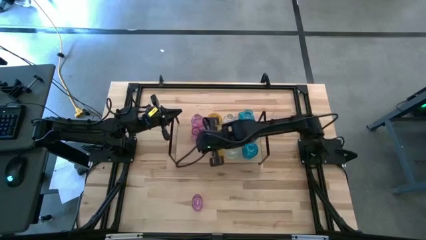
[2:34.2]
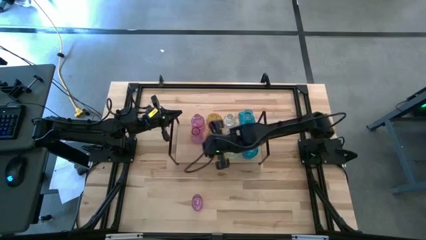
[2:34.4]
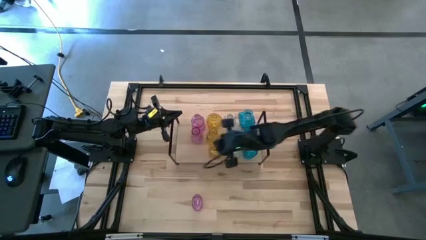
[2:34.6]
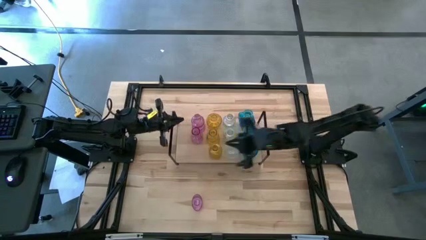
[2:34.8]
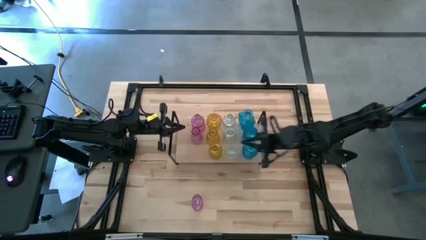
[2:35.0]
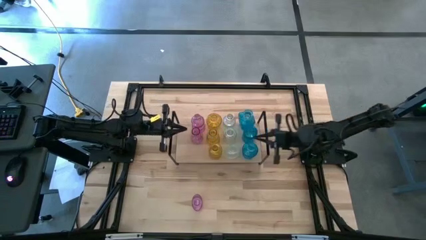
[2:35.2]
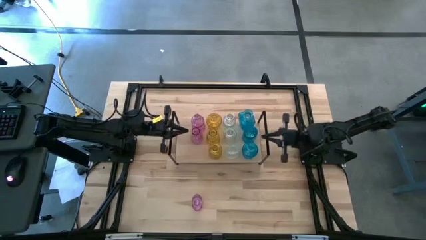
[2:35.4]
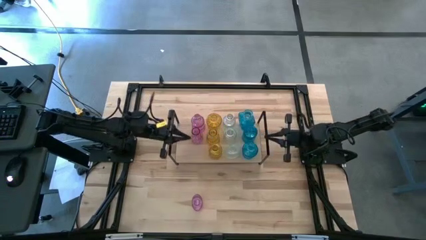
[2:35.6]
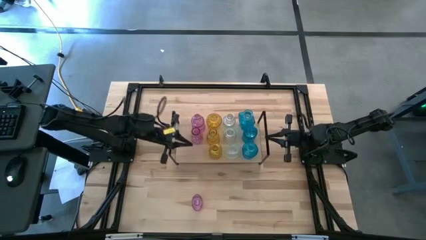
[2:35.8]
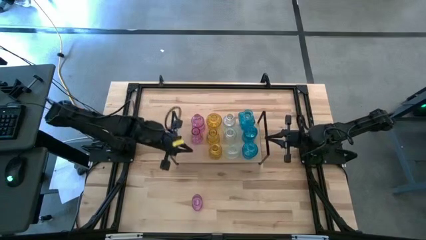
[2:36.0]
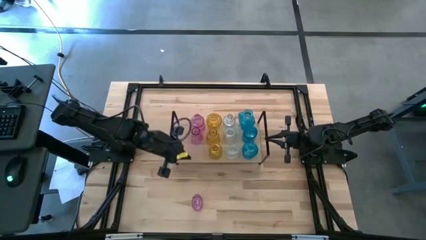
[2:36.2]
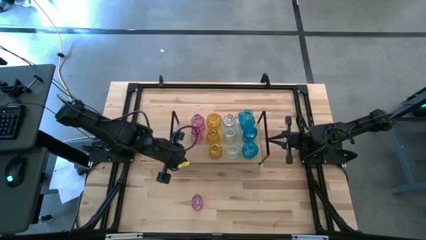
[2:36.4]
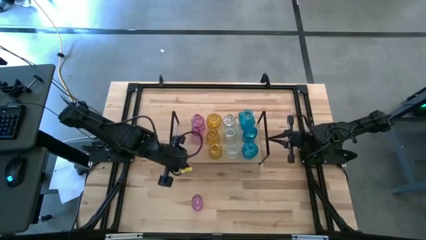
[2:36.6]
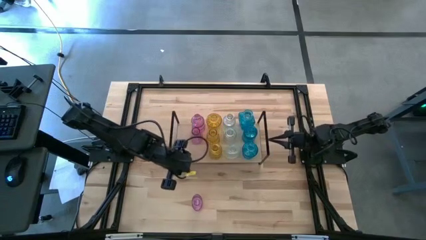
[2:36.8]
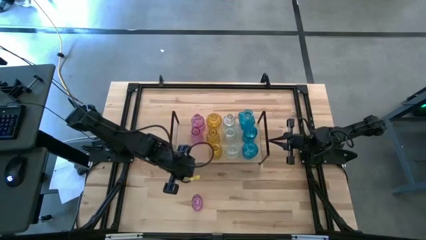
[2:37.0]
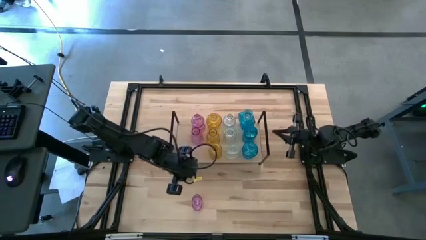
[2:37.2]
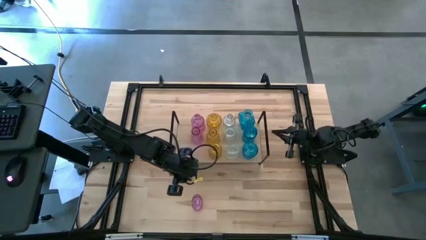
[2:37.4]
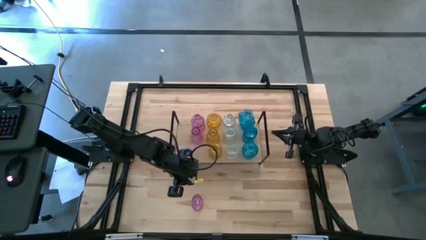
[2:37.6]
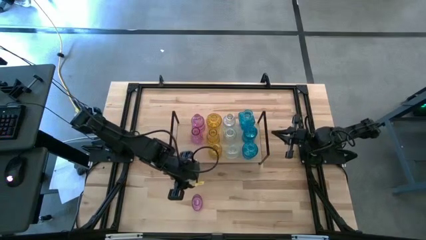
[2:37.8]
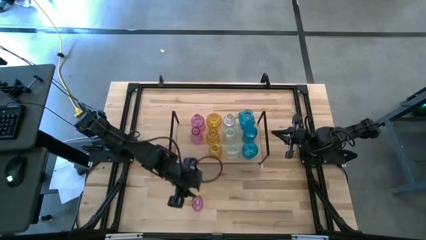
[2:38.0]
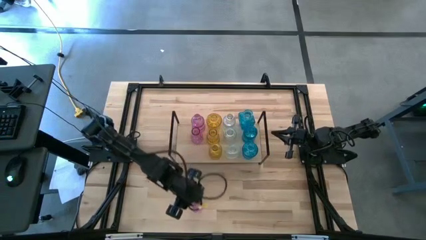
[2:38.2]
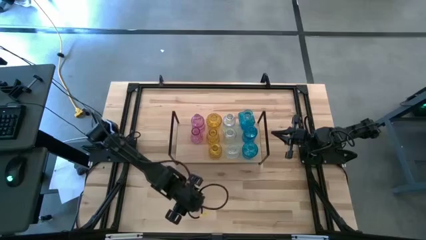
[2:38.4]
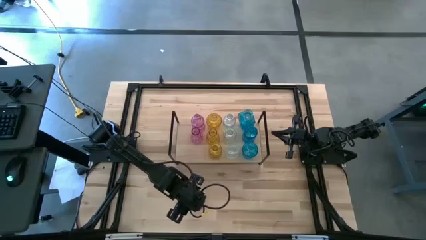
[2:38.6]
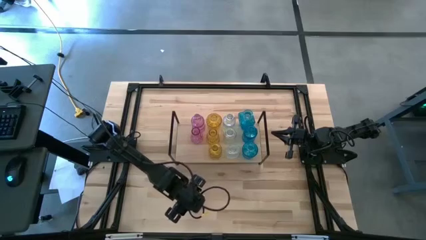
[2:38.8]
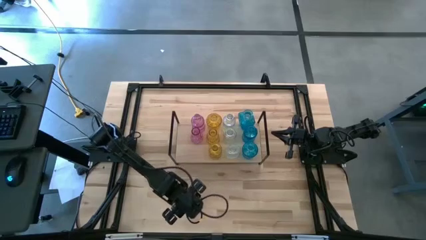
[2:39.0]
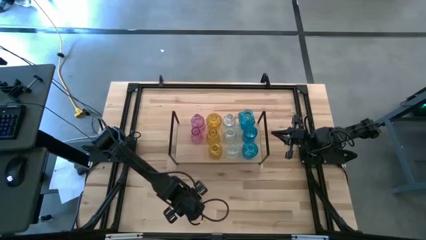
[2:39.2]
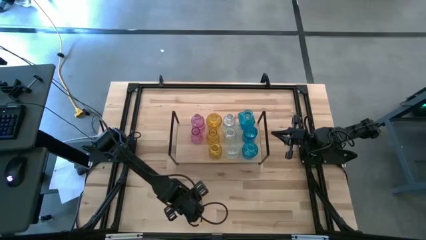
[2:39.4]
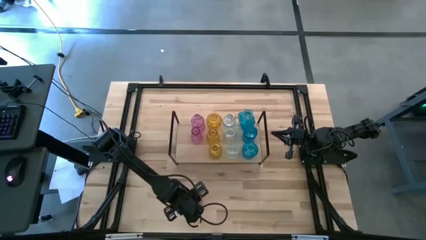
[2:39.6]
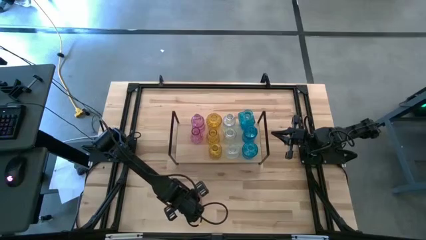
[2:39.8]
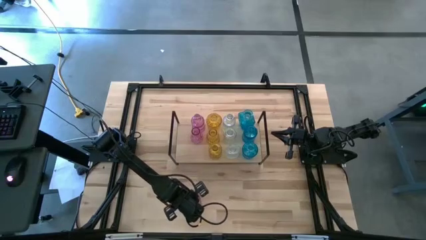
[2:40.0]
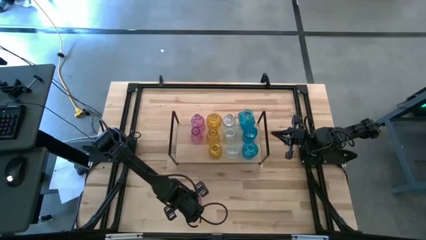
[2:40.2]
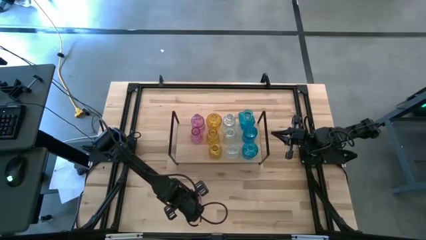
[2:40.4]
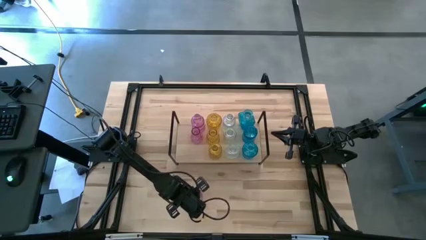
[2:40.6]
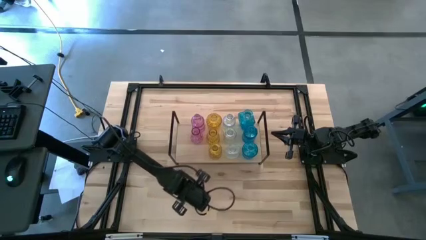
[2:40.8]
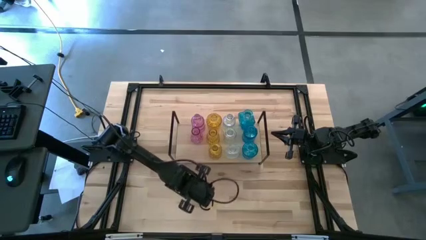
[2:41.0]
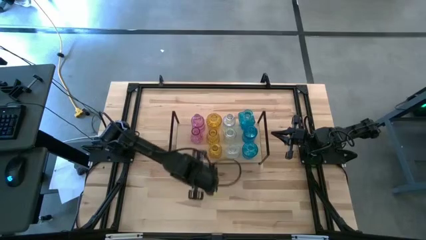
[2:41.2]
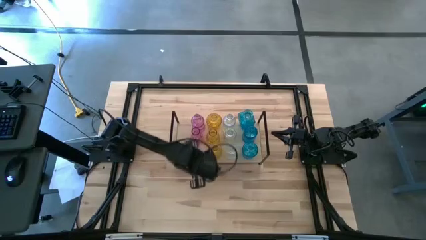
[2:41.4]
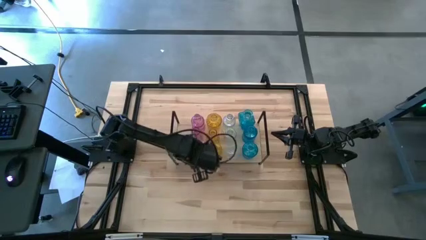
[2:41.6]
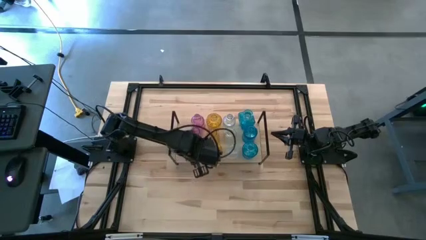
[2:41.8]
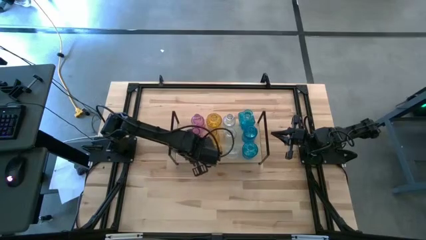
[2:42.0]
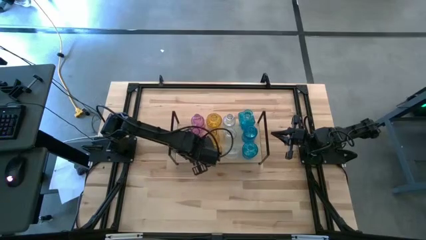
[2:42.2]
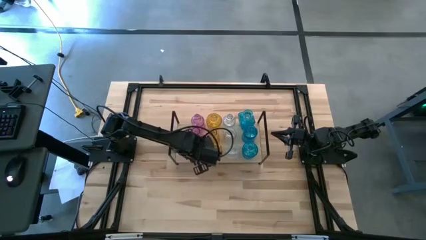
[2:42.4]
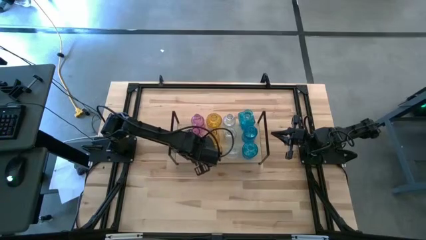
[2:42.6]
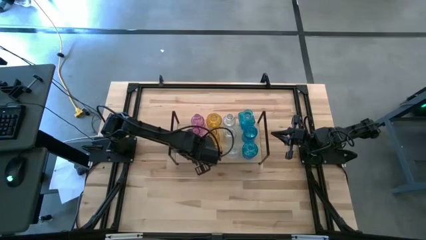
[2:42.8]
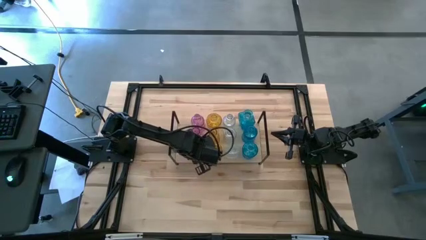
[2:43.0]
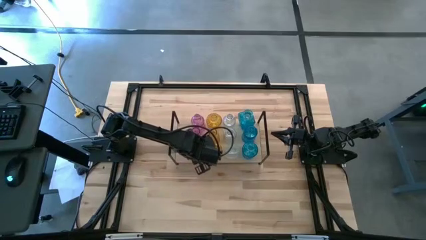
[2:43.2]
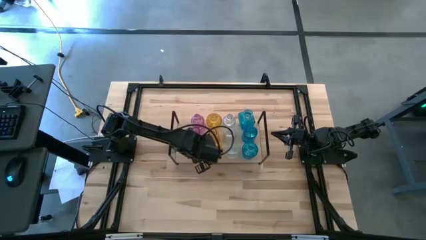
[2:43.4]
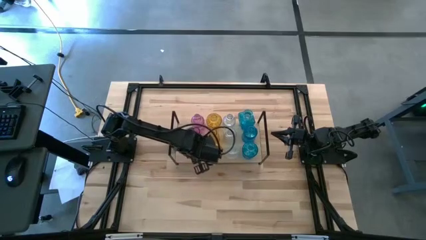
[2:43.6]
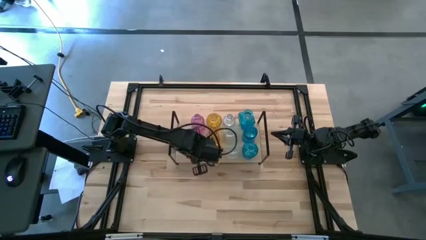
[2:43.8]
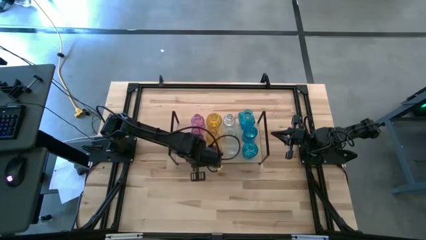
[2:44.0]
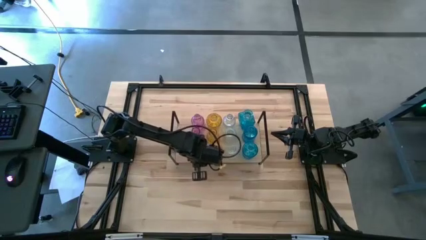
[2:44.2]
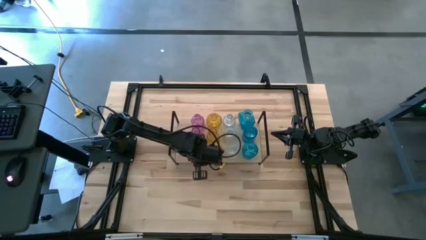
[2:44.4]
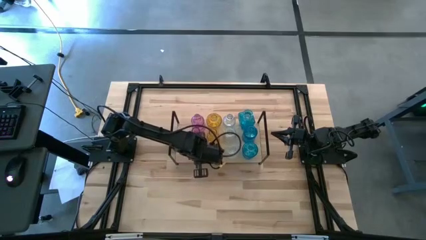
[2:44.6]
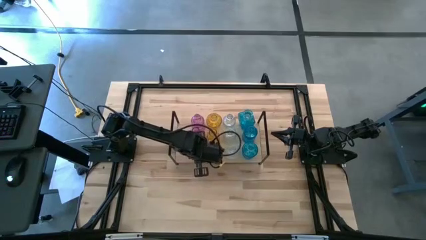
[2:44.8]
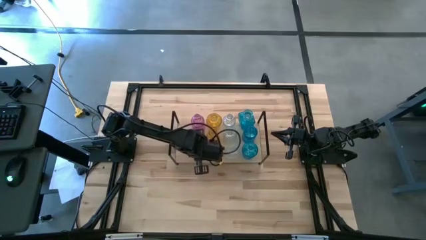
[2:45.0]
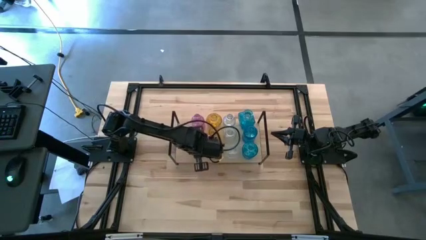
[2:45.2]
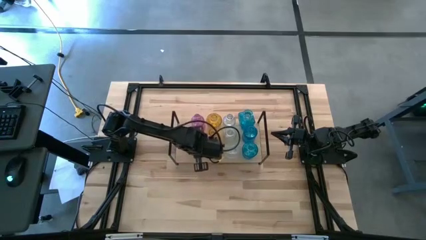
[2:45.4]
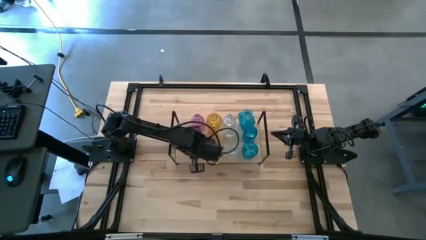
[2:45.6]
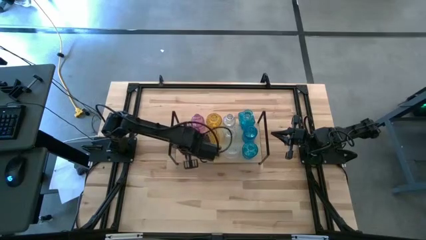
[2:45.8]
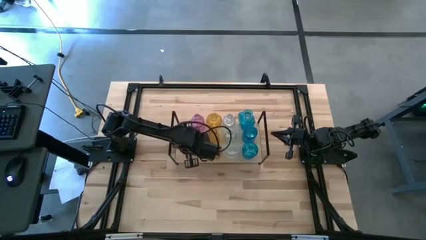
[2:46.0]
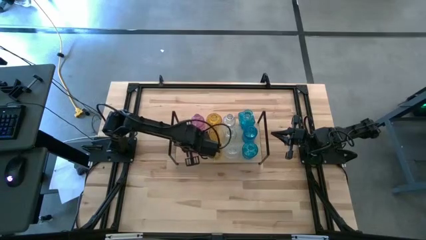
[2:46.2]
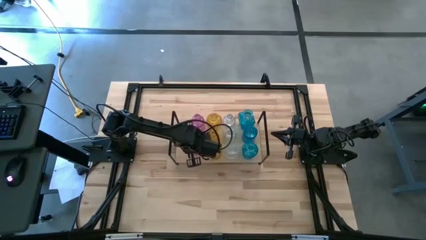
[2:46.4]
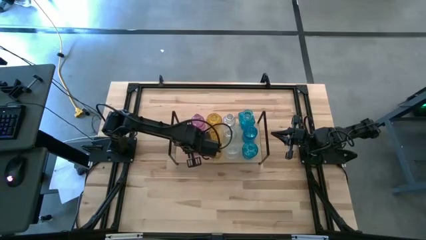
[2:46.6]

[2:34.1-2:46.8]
Task: sort vases onto shelf
Put the purple vase aligned with the other purple vases on the shelf
